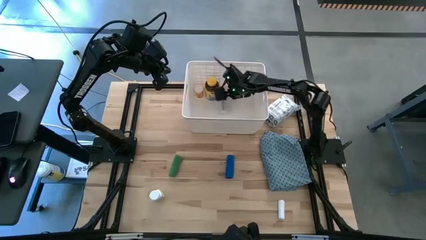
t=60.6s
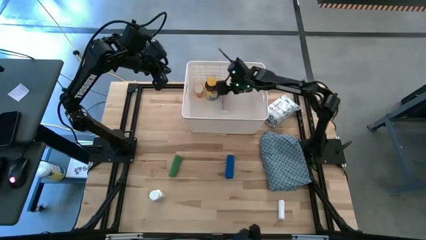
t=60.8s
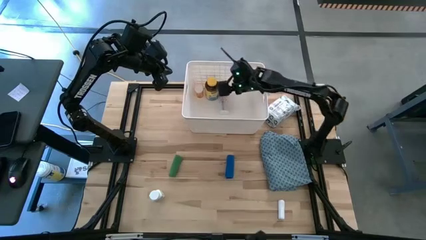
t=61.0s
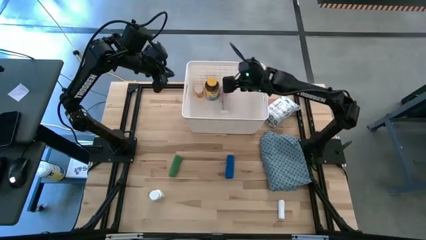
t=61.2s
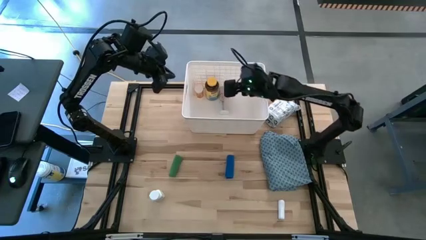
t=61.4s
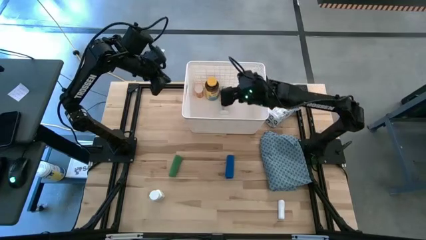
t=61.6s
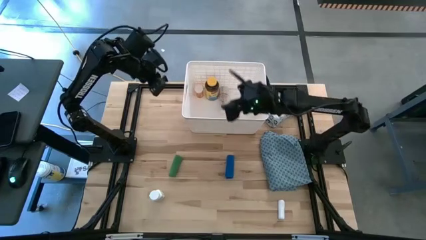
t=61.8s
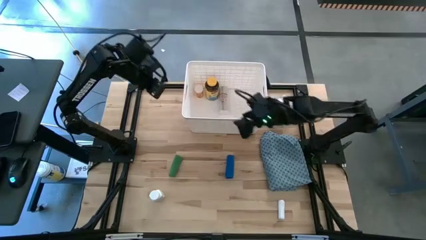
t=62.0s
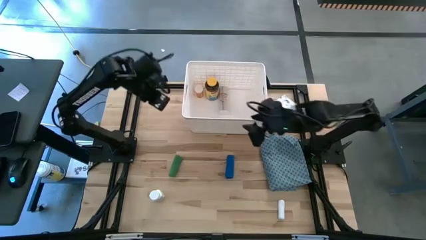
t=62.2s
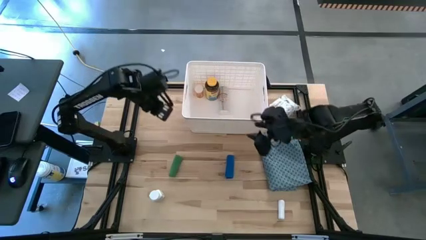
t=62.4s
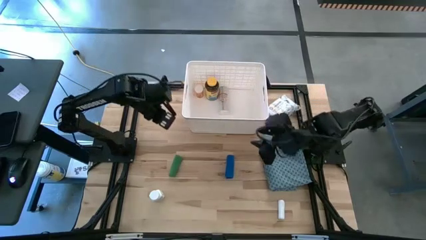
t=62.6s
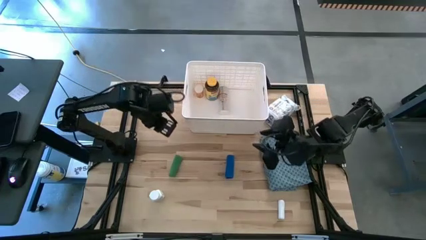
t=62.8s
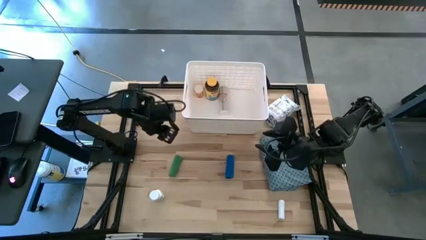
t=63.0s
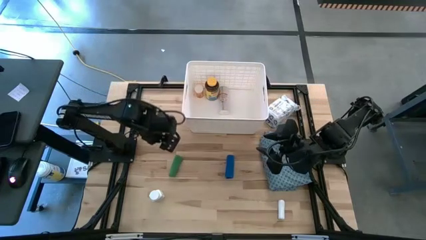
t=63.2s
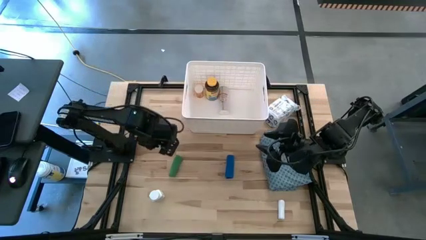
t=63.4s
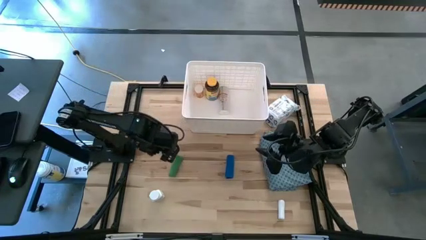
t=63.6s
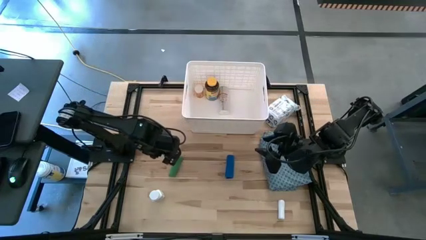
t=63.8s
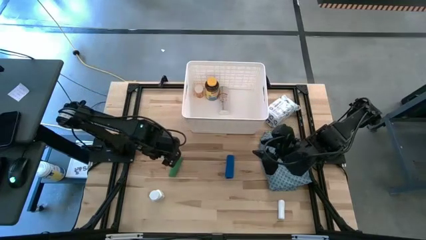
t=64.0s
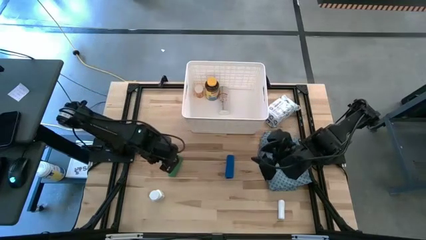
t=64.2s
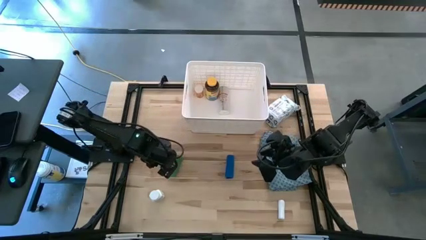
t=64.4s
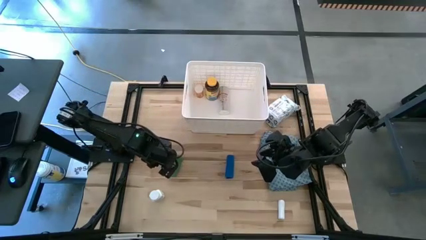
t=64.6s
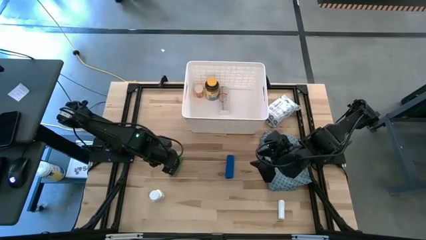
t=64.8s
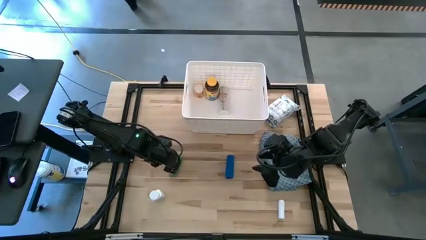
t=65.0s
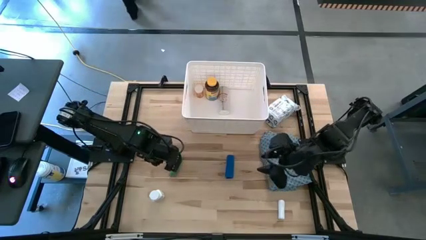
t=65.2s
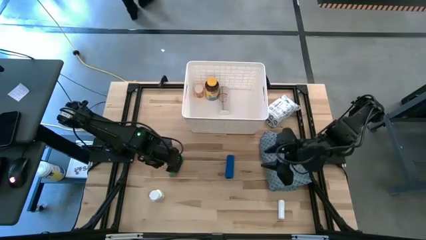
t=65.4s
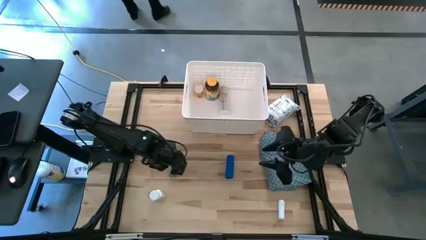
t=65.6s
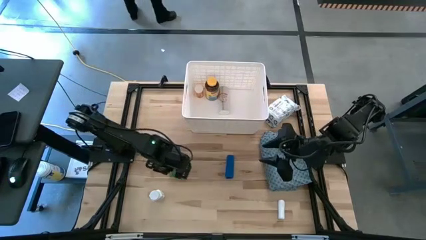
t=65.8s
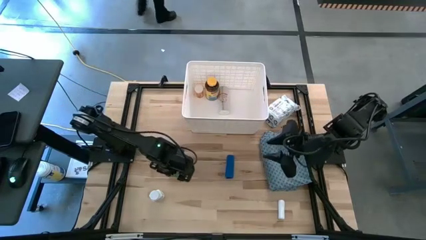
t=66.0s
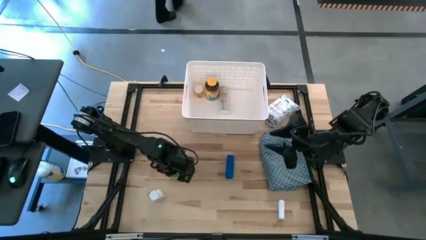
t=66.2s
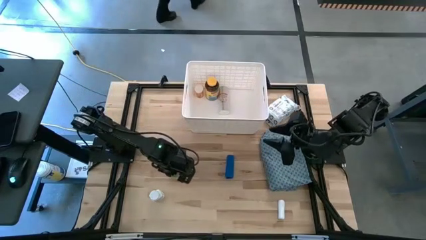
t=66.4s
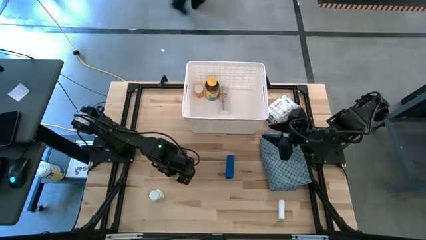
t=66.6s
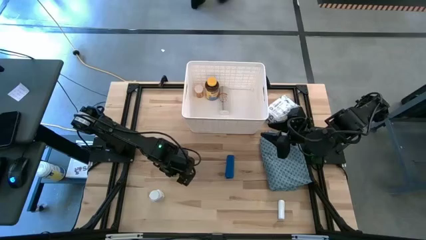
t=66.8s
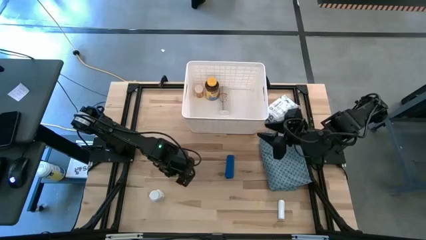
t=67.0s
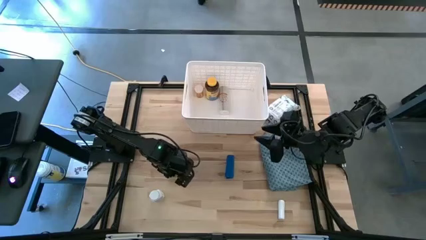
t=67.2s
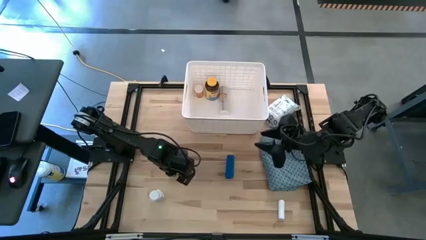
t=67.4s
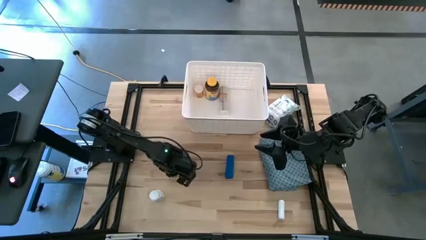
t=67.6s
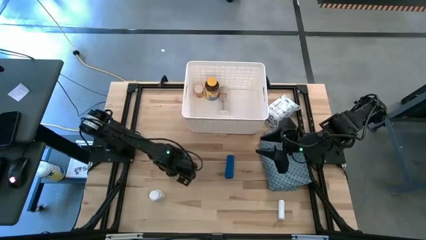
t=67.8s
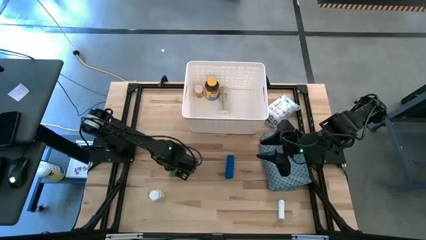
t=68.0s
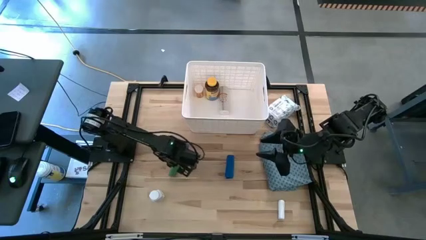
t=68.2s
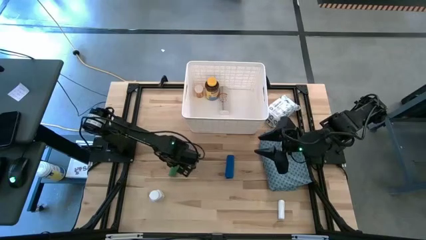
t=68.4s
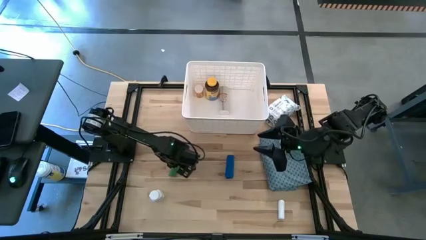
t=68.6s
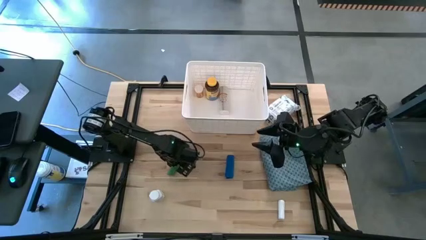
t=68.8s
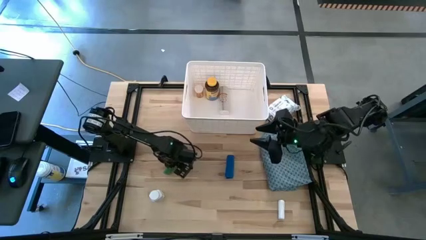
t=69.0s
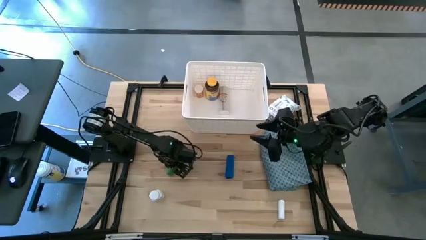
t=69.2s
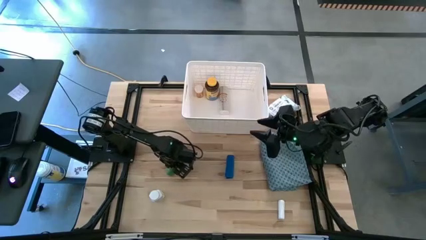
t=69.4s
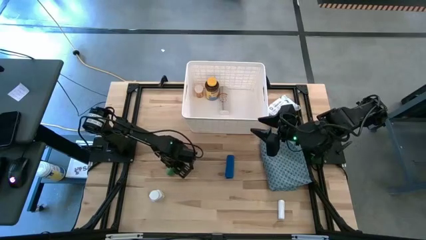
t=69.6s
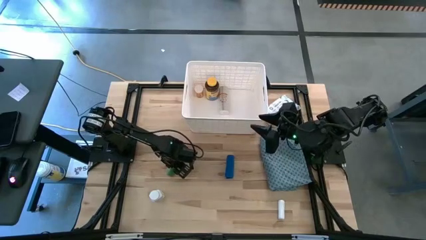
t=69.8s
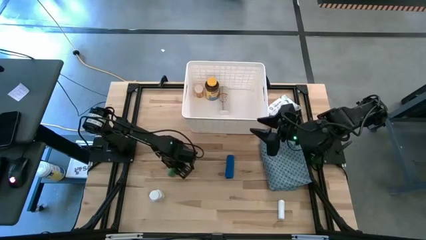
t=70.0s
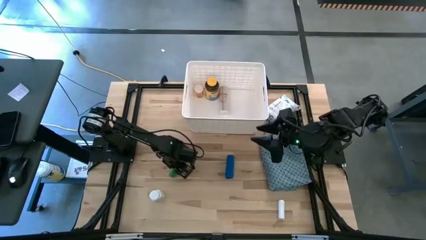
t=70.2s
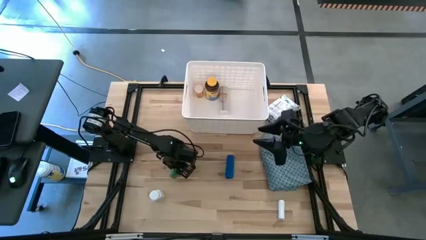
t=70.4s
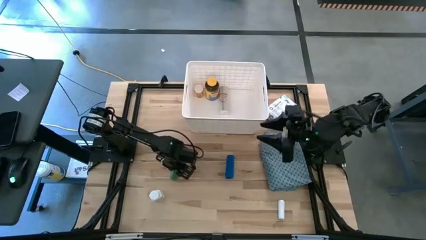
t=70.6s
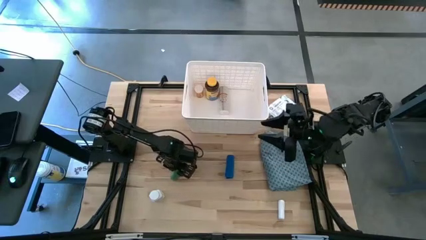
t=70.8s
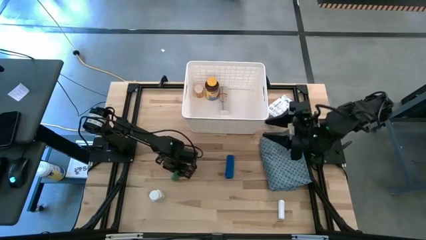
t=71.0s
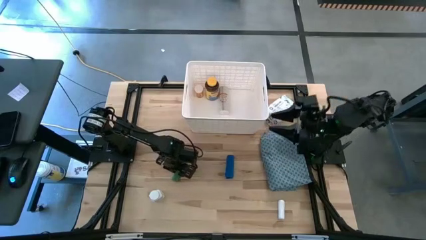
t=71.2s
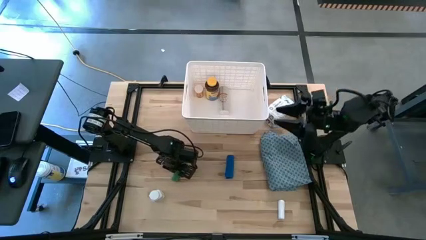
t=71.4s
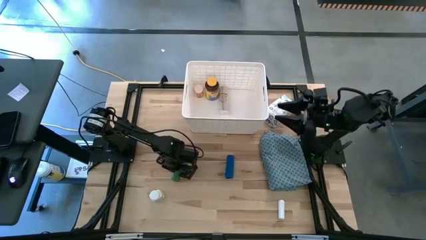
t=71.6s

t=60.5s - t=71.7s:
Task: Pick & place medical supplies in basket/bin
Put the green bandage into the white bin

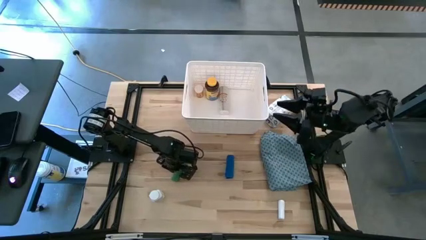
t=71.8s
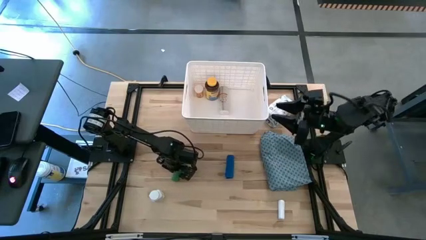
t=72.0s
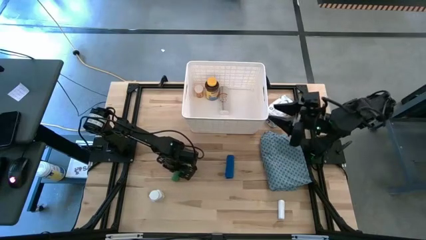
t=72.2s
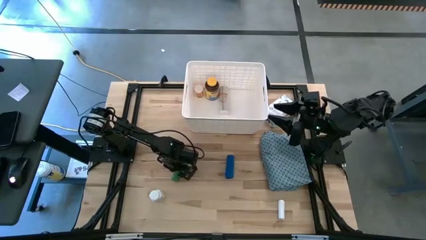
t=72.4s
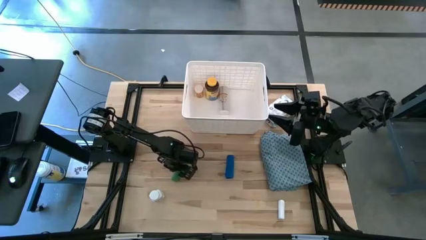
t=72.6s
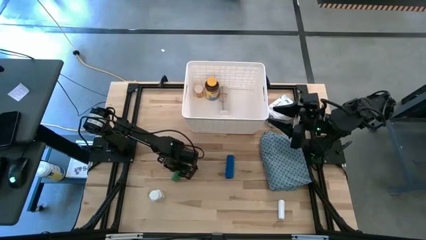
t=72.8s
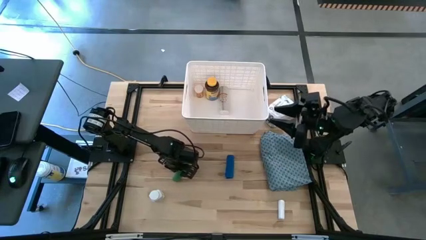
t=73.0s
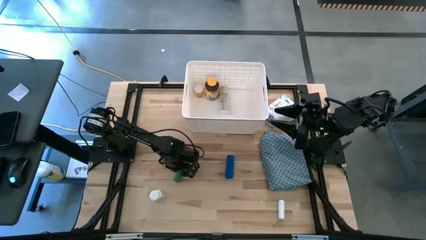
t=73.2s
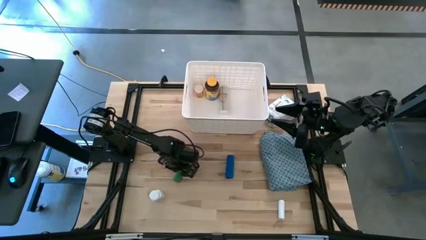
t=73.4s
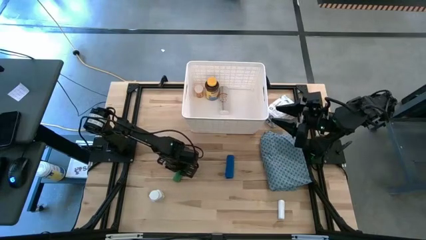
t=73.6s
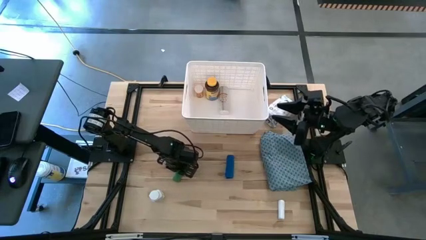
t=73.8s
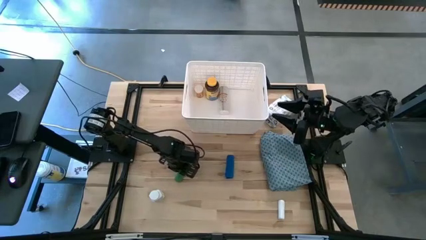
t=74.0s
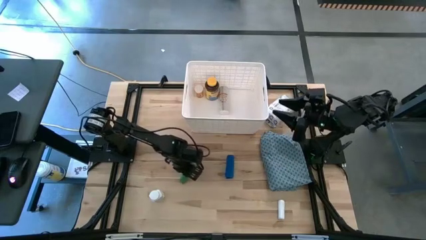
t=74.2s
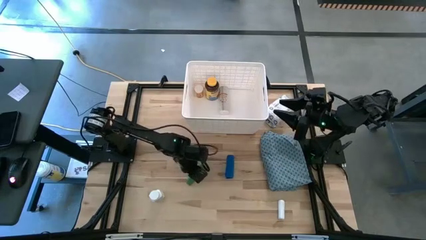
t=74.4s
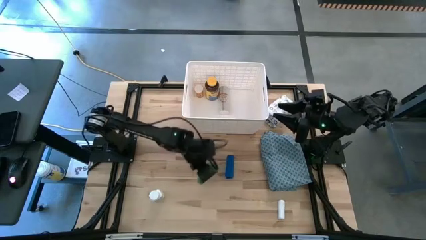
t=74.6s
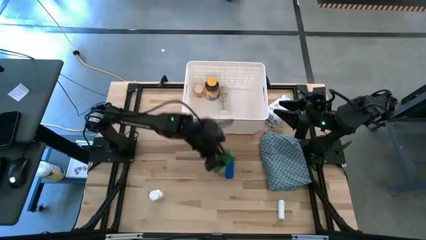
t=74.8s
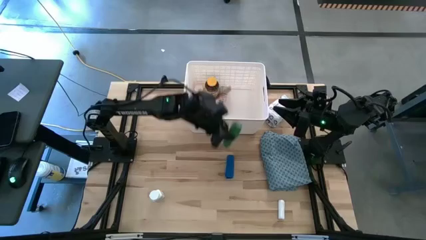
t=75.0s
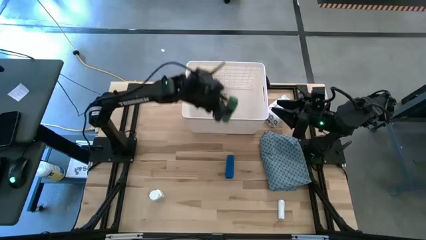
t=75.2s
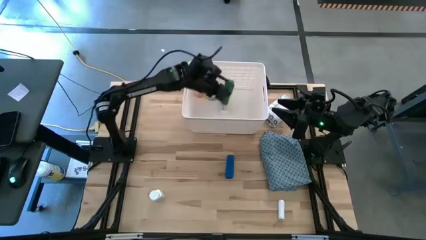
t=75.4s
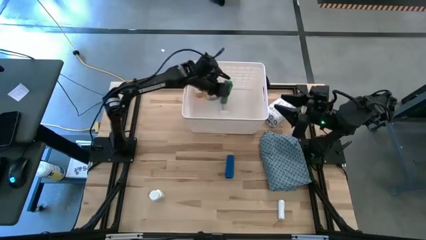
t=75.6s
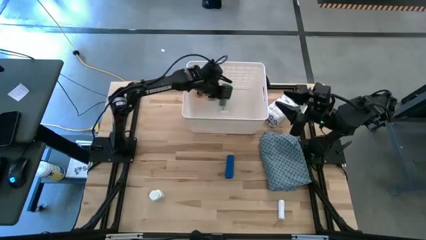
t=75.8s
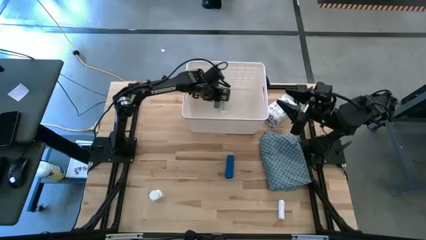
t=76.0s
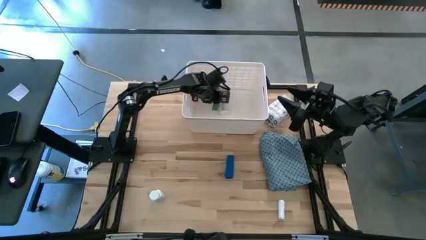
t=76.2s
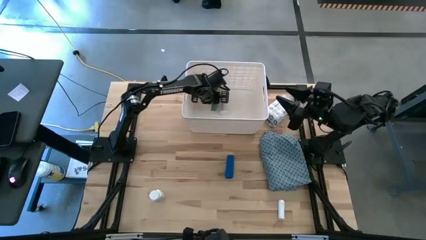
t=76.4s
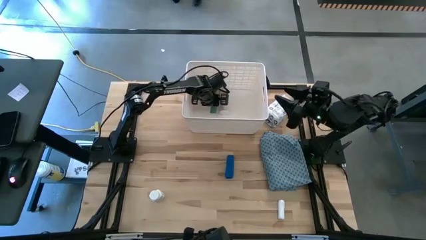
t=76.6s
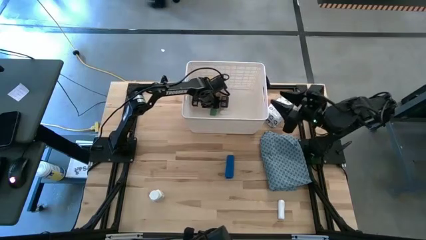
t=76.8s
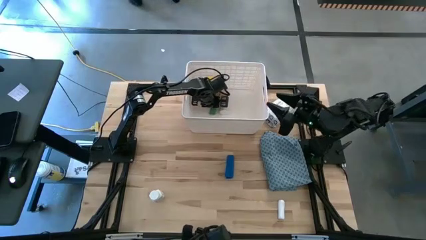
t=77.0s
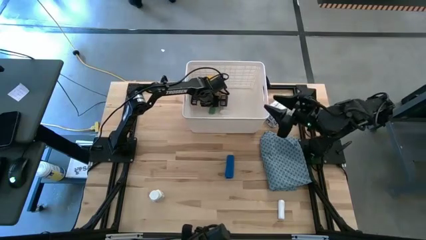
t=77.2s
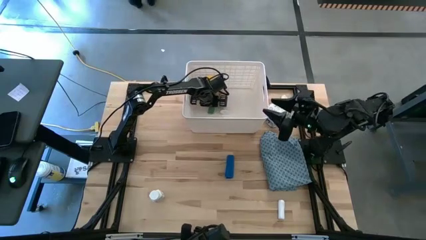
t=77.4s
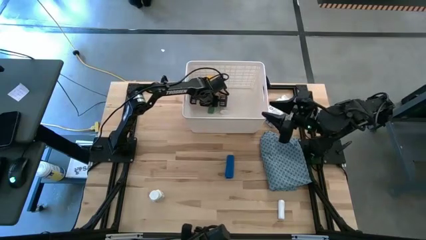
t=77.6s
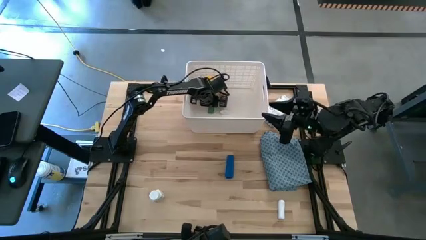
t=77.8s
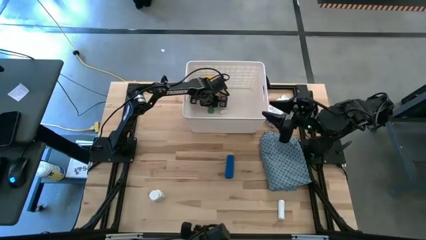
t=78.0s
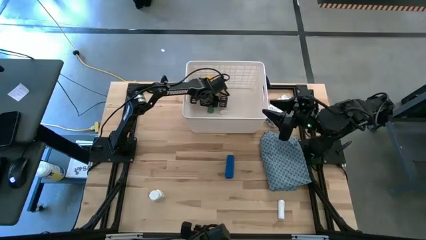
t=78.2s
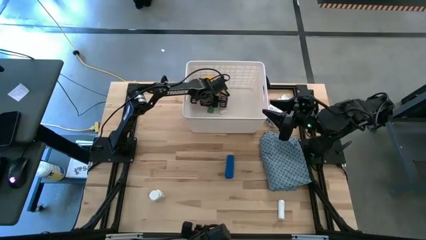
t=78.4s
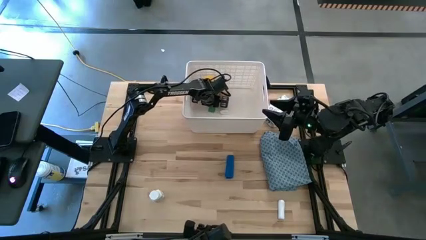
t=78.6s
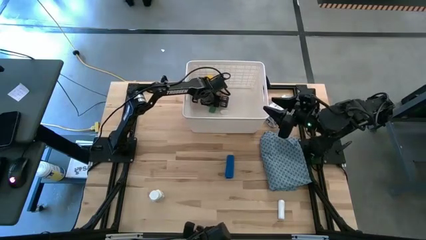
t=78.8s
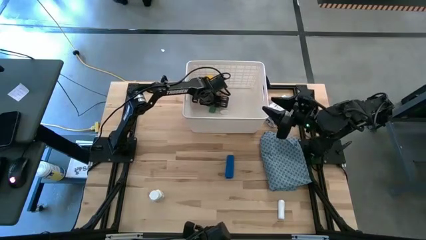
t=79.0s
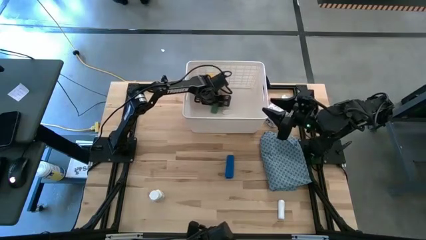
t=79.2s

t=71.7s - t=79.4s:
Put the green bandage into the white bin
